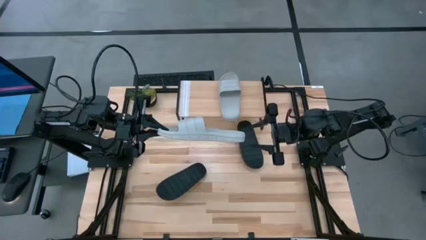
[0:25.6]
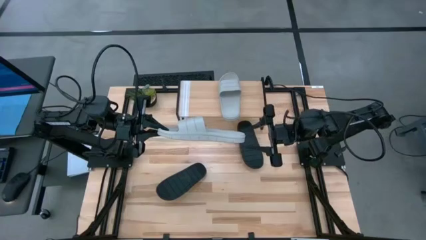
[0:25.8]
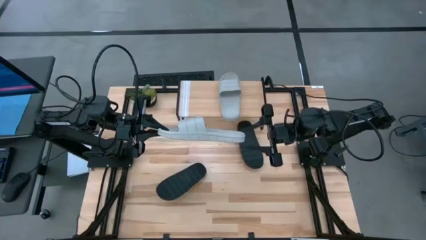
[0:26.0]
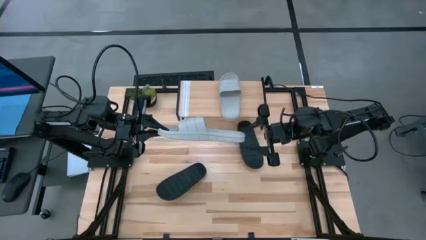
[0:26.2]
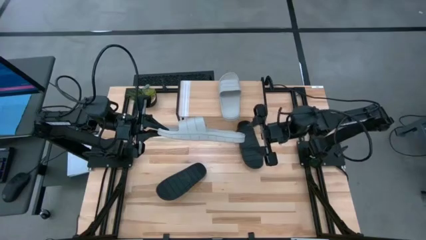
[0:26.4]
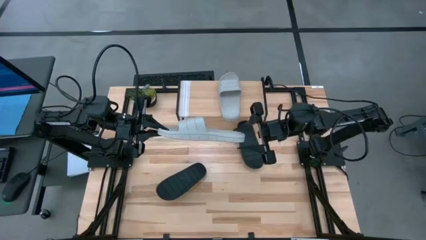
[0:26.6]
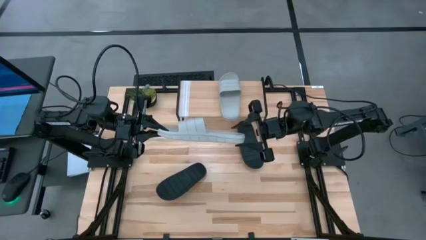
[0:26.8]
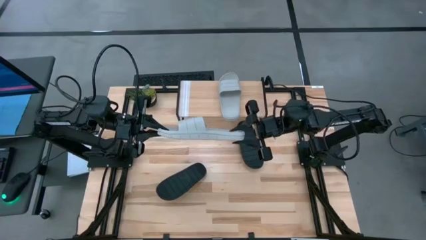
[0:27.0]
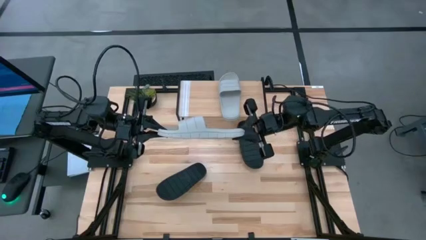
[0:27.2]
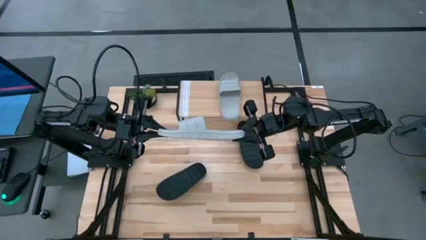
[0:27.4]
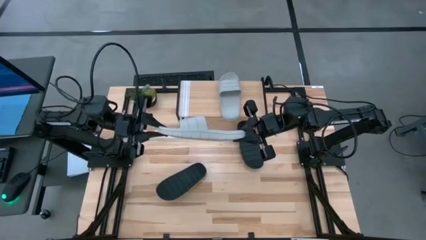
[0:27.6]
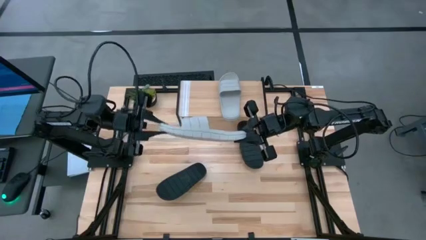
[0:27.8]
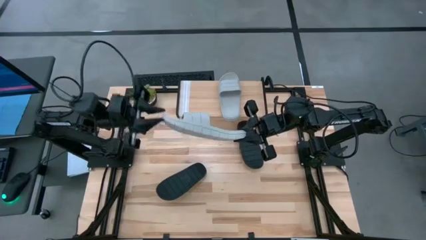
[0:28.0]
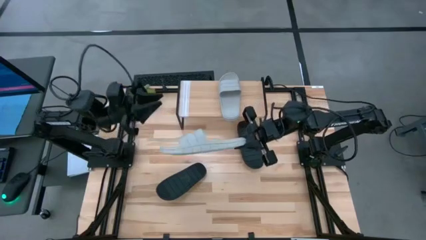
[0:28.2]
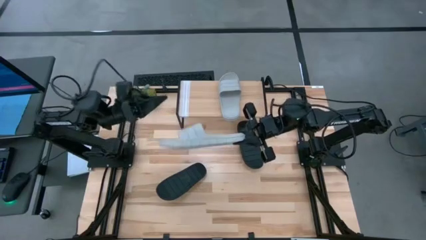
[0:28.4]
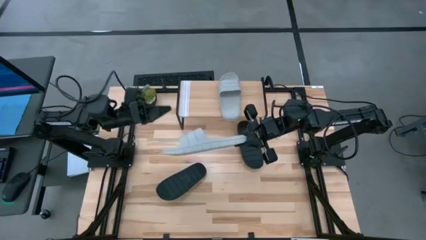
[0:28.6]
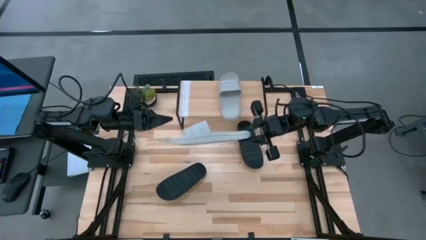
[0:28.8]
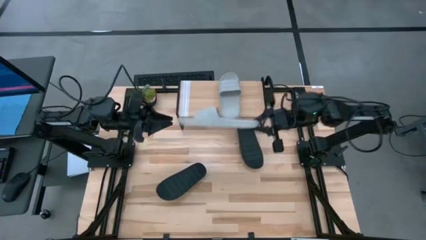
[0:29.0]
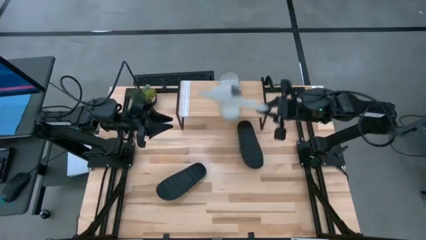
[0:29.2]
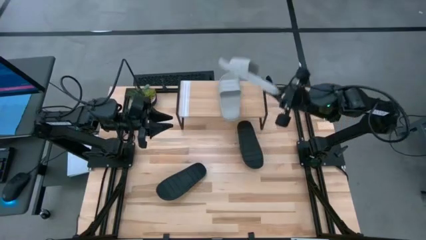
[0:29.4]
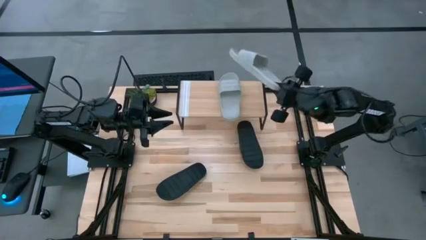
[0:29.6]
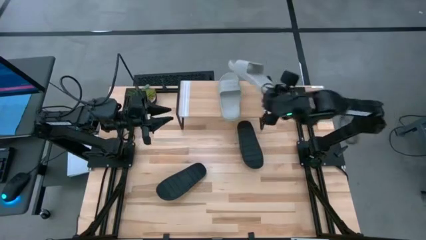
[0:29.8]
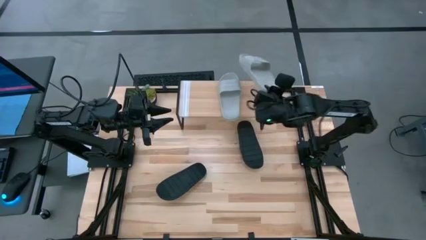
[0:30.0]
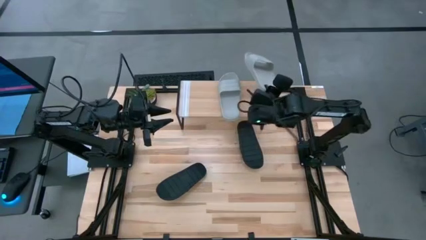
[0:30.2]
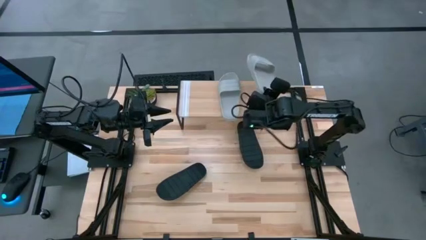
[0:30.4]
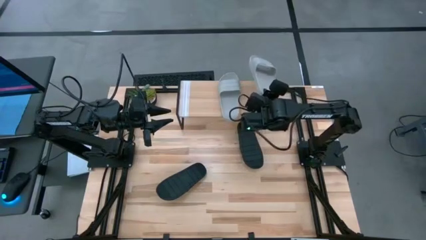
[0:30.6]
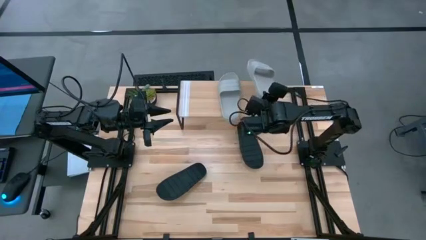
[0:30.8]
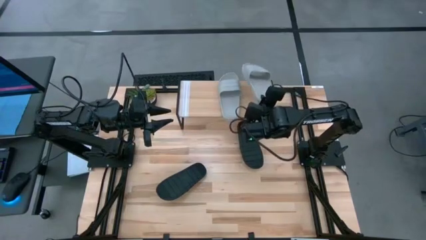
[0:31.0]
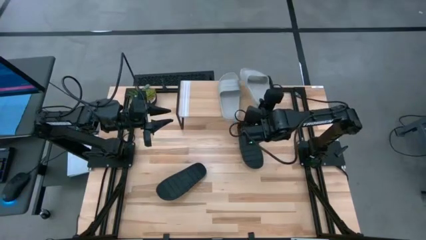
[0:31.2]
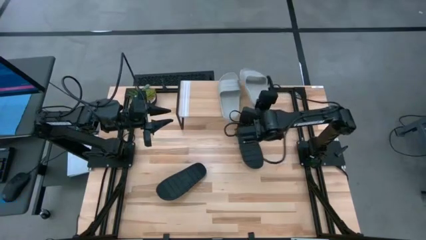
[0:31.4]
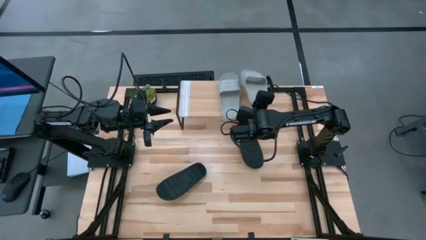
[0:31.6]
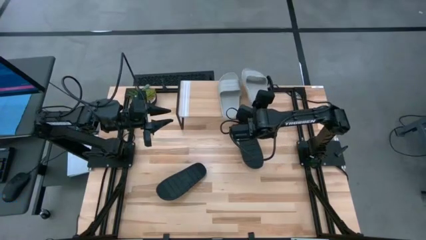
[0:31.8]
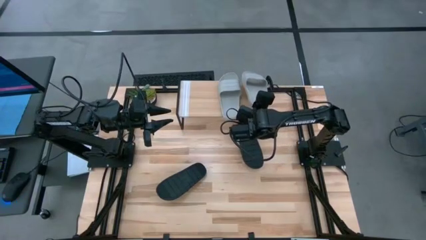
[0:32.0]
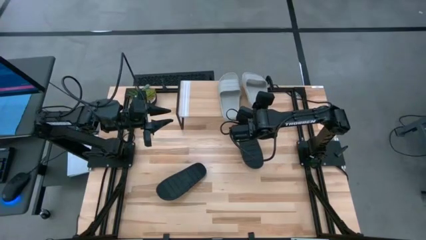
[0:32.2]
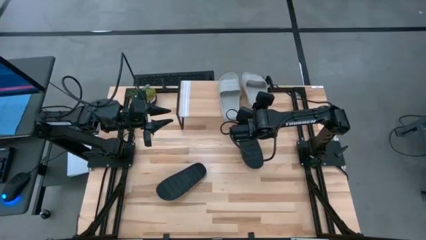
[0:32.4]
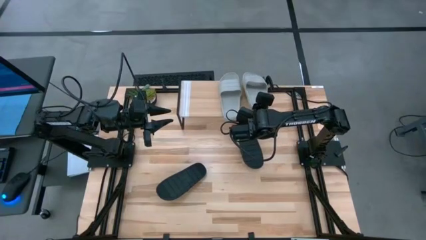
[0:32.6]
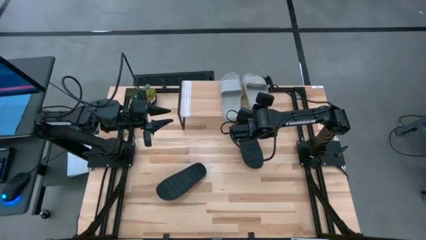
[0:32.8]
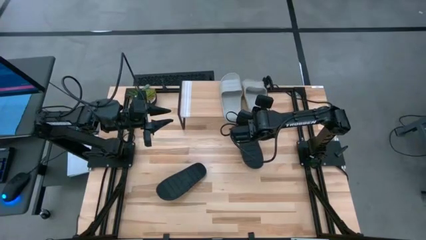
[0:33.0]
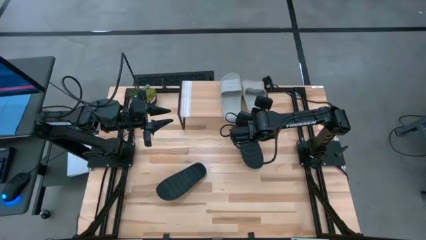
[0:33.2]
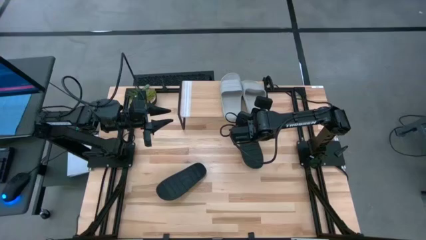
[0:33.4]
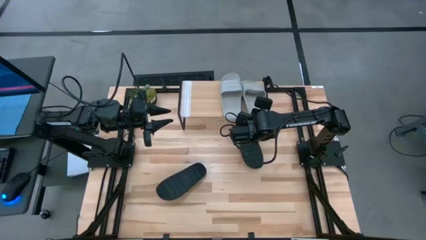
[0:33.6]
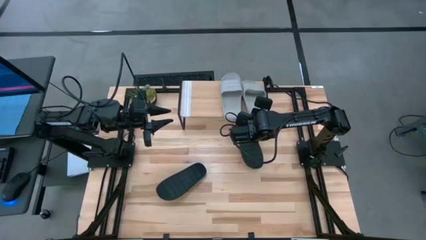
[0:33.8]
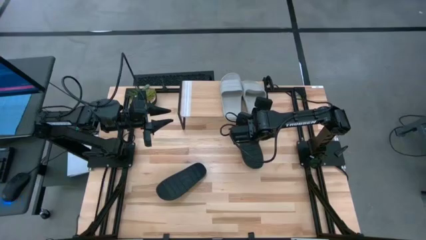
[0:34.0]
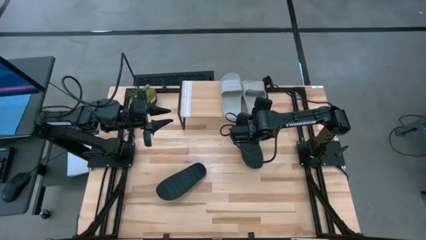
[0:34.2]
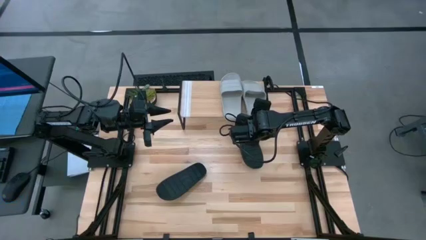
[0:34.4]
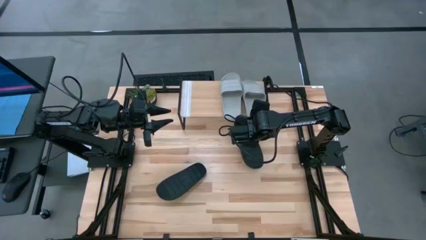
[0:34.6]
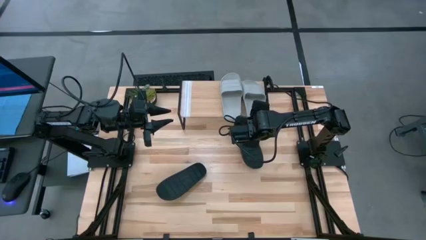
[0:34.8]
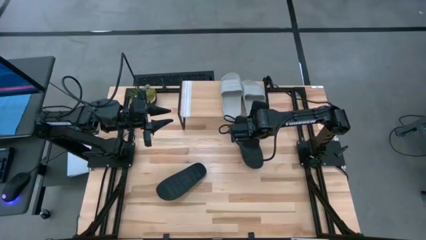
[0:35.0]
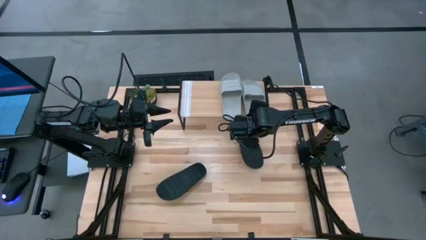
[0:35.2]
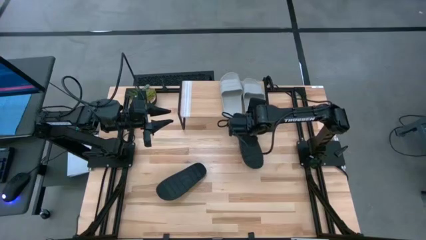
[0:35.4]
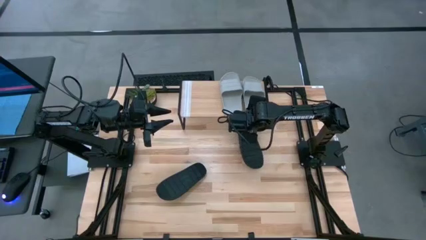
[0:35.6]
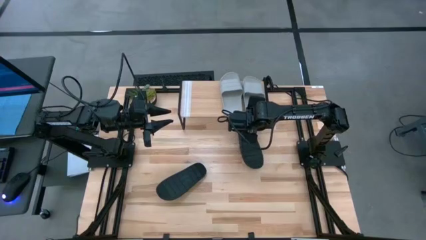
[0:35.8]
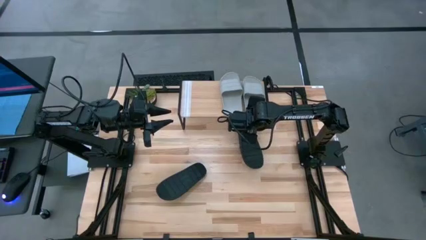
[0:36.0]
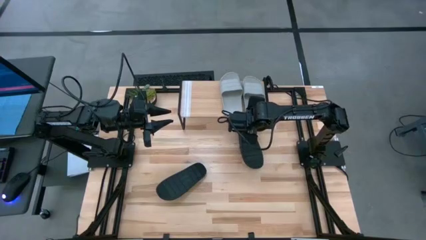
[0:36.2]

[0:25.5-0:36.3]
Task: Pick and place slides into the shelf
Put the gray slide on the shelf
